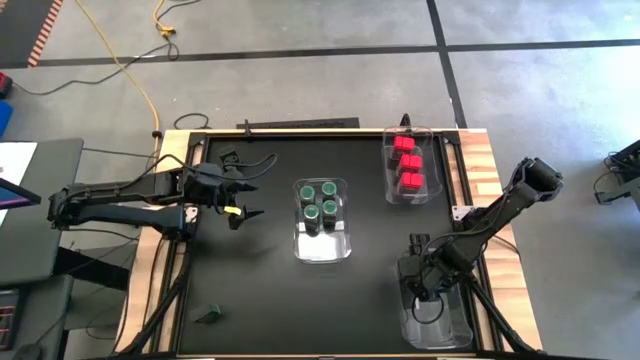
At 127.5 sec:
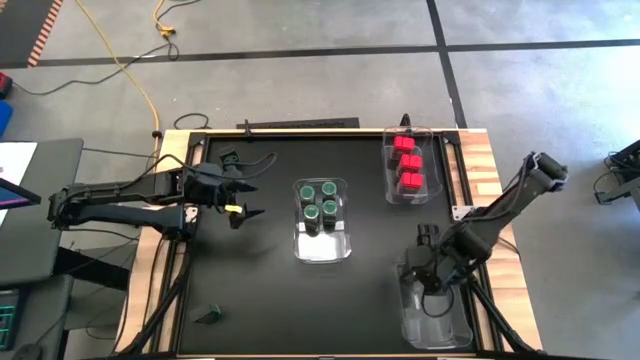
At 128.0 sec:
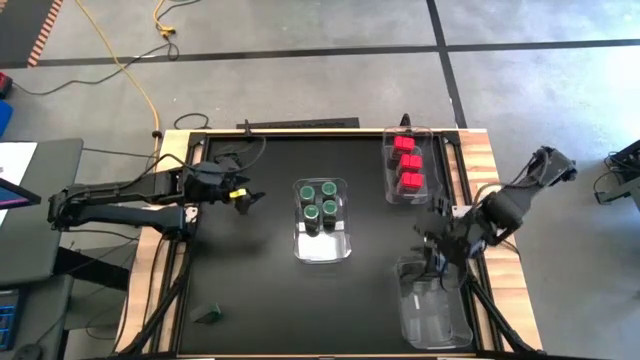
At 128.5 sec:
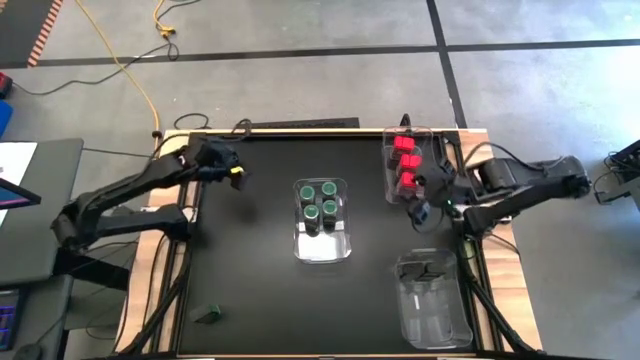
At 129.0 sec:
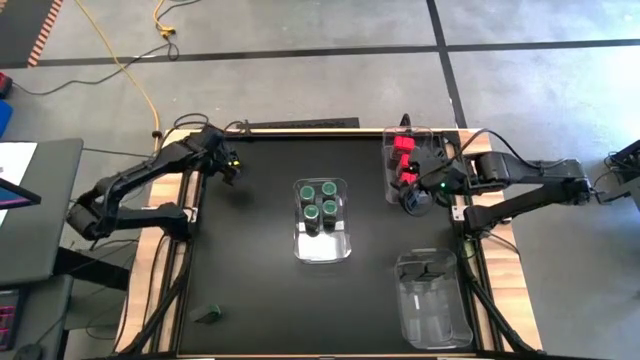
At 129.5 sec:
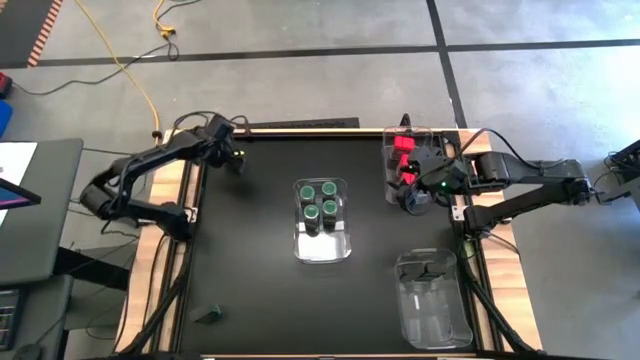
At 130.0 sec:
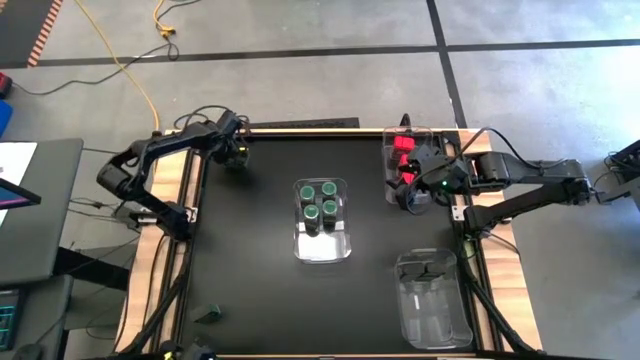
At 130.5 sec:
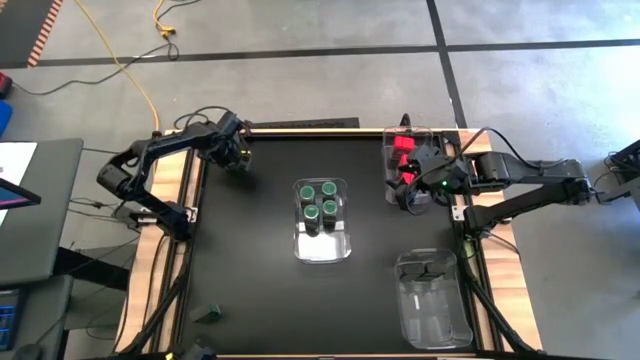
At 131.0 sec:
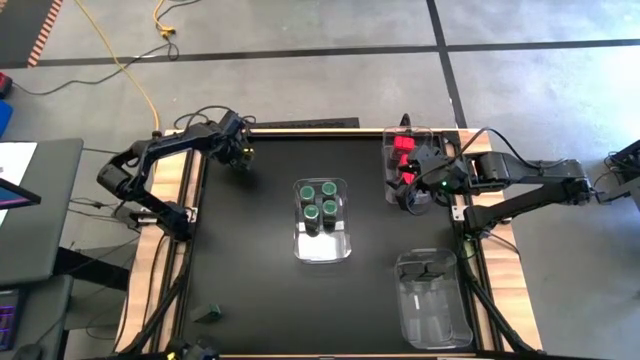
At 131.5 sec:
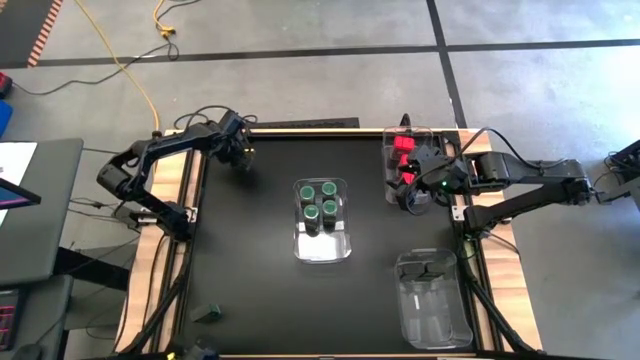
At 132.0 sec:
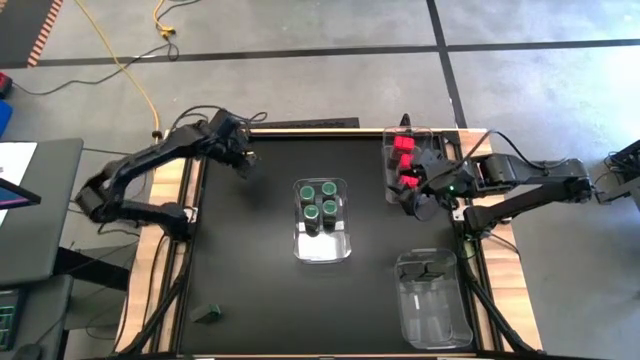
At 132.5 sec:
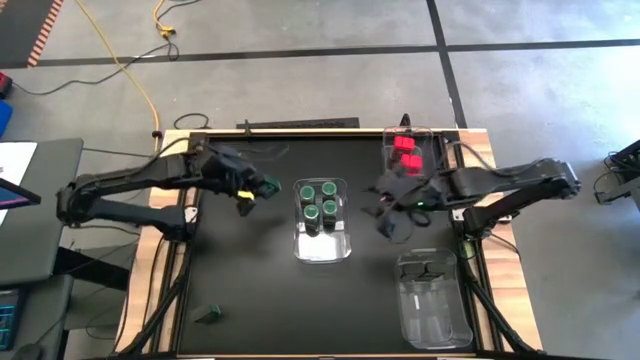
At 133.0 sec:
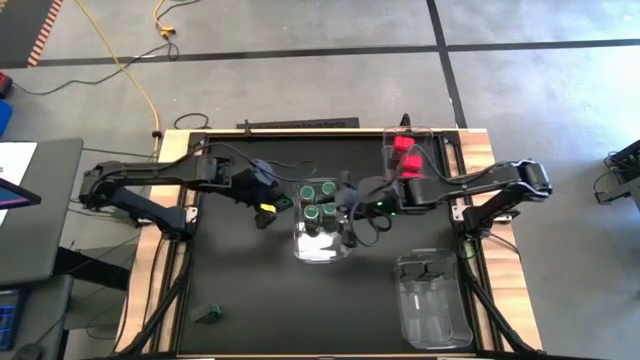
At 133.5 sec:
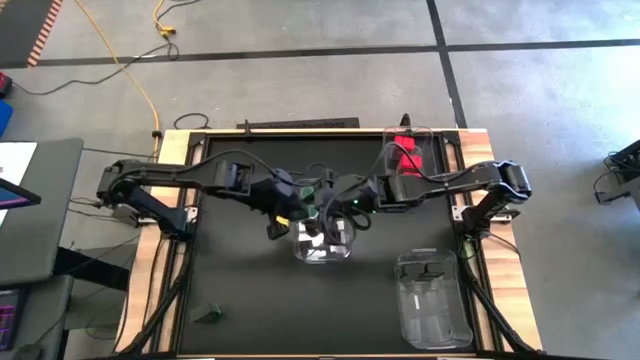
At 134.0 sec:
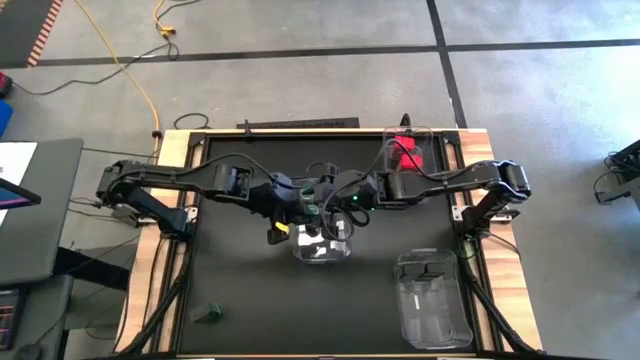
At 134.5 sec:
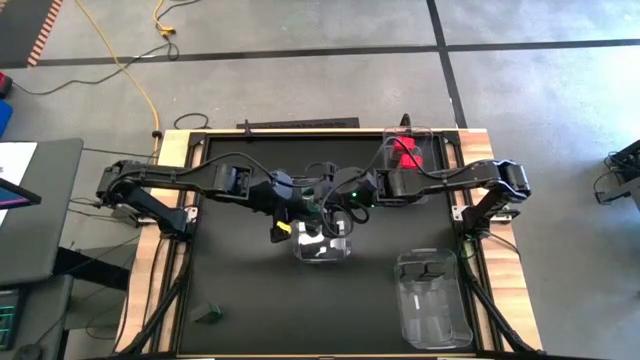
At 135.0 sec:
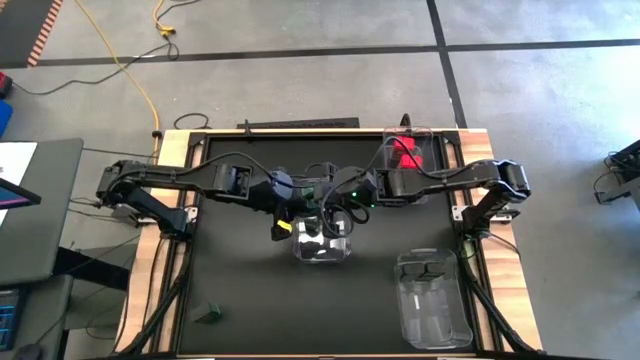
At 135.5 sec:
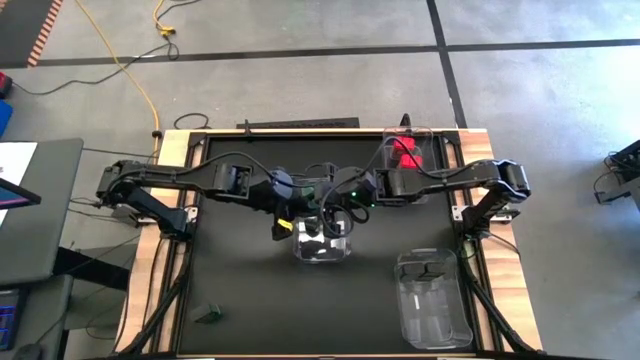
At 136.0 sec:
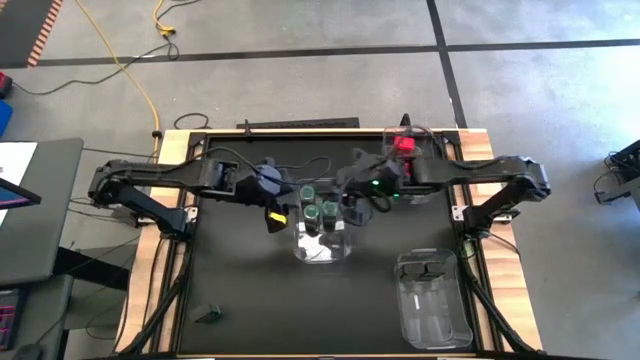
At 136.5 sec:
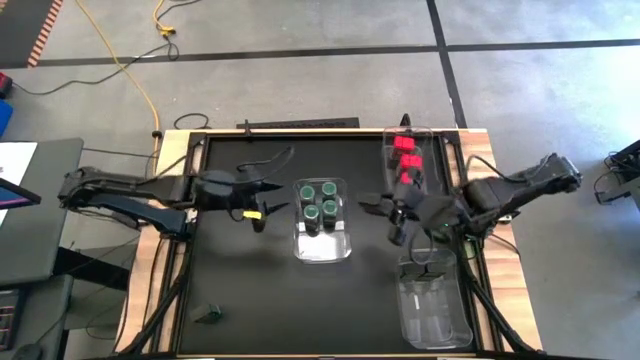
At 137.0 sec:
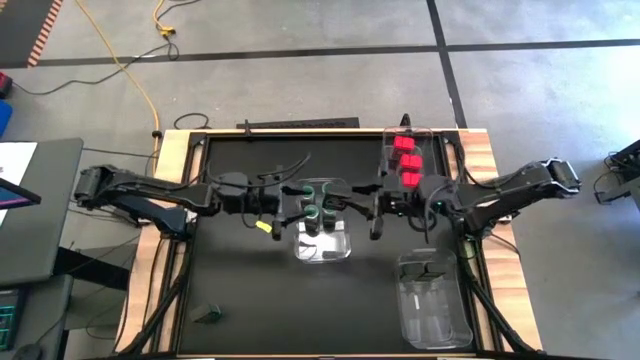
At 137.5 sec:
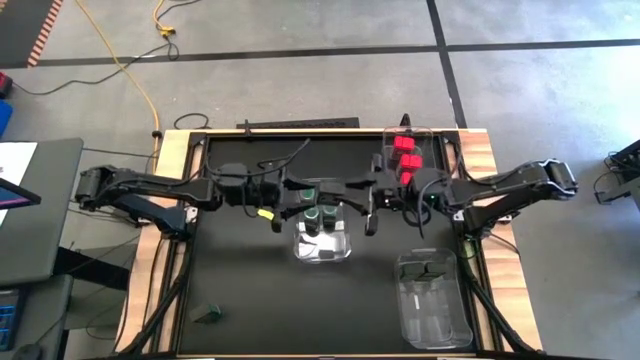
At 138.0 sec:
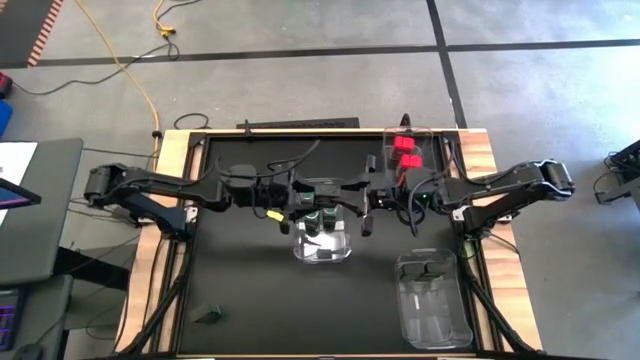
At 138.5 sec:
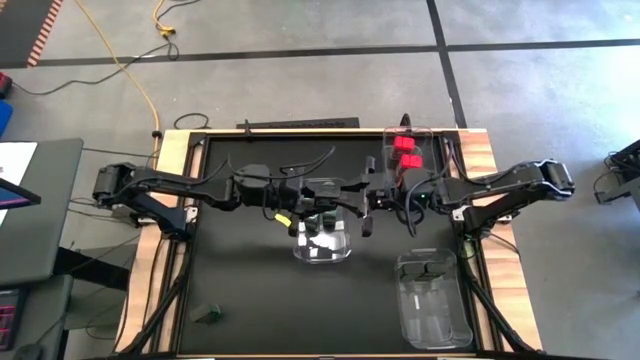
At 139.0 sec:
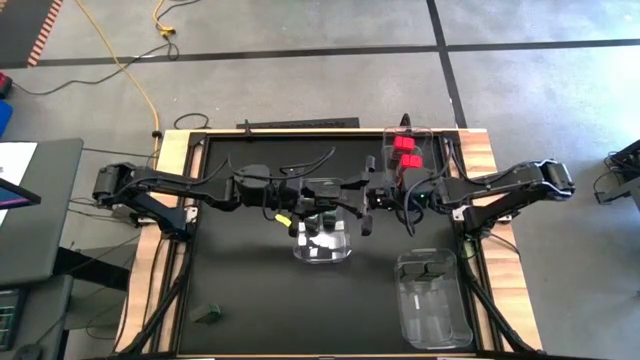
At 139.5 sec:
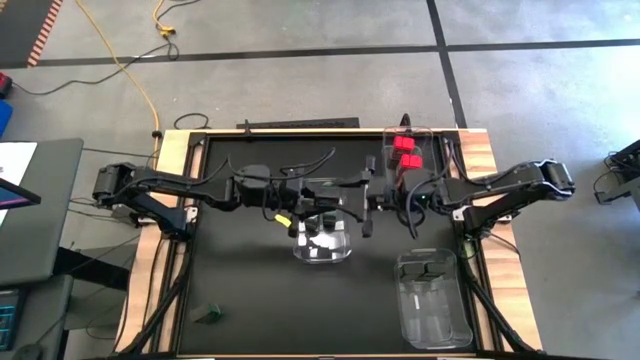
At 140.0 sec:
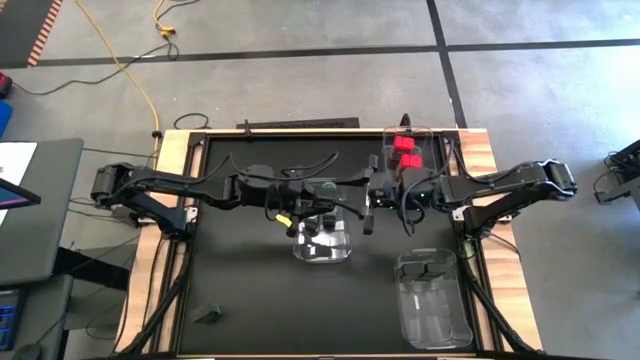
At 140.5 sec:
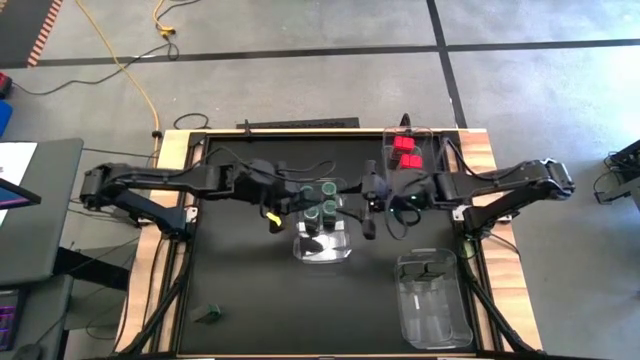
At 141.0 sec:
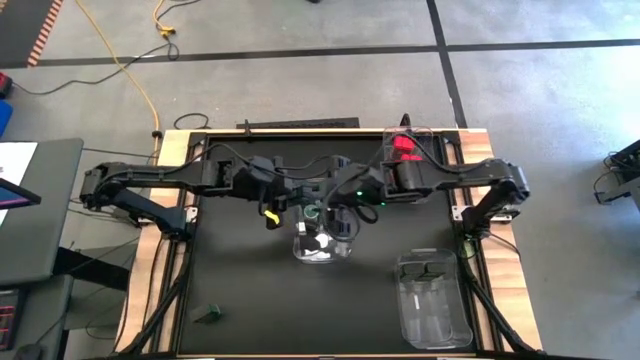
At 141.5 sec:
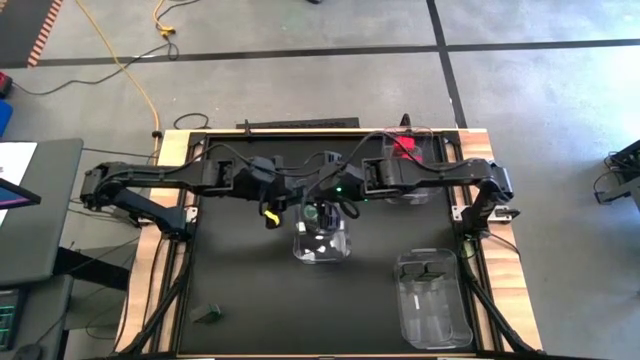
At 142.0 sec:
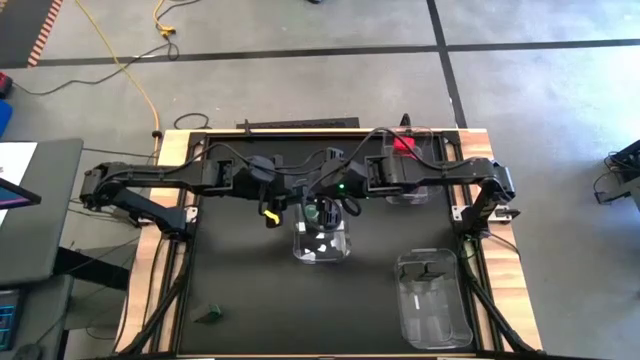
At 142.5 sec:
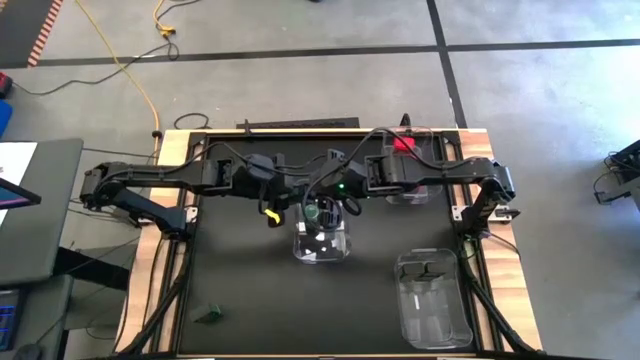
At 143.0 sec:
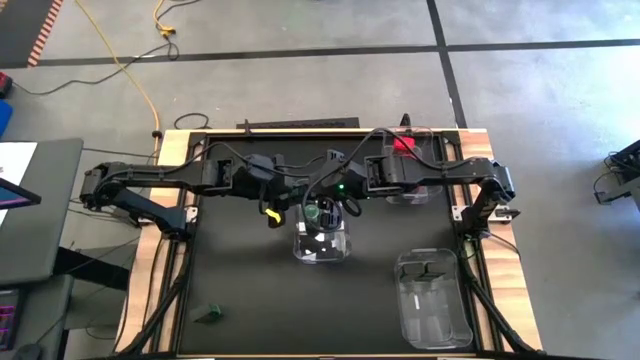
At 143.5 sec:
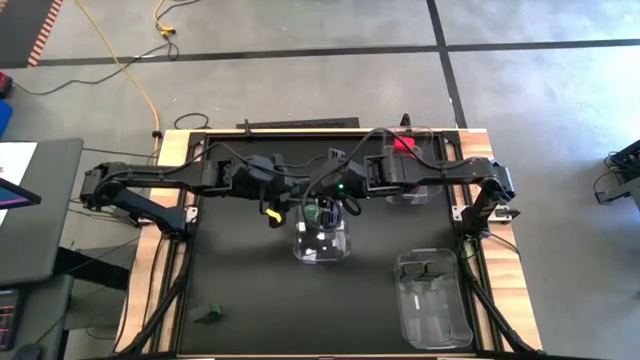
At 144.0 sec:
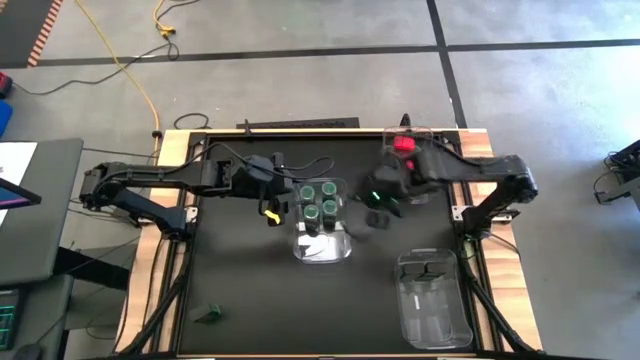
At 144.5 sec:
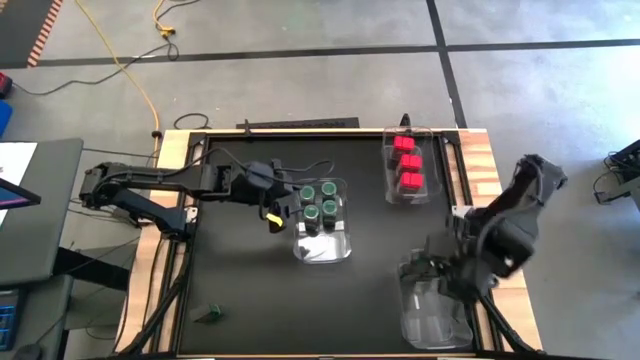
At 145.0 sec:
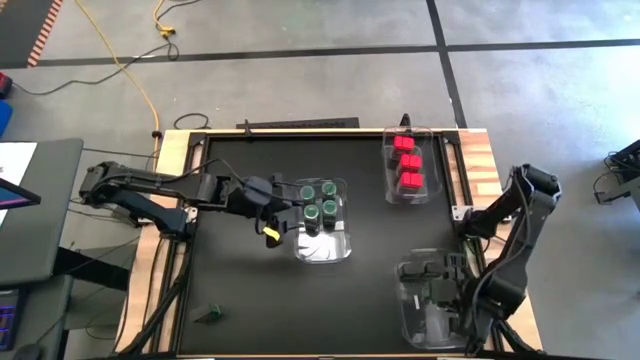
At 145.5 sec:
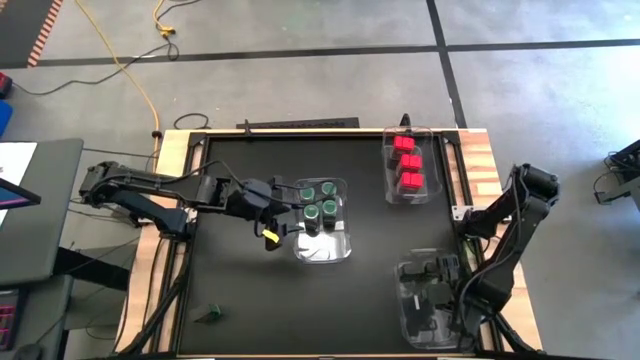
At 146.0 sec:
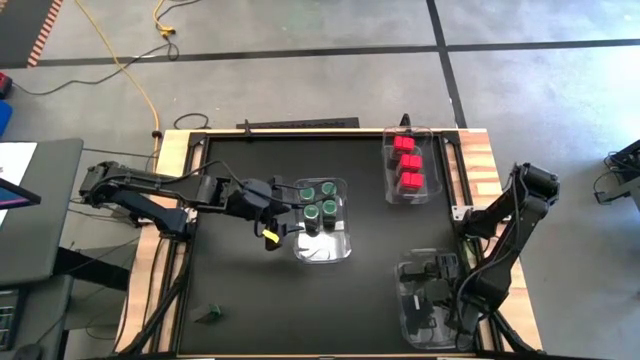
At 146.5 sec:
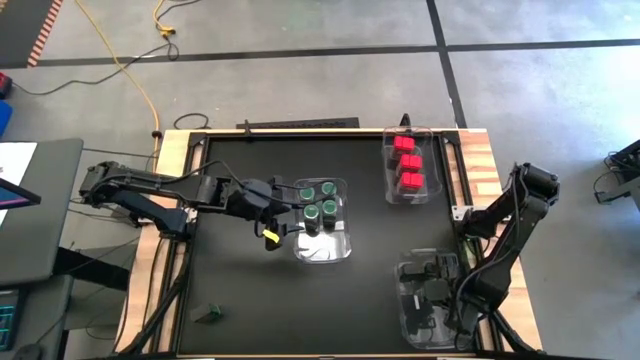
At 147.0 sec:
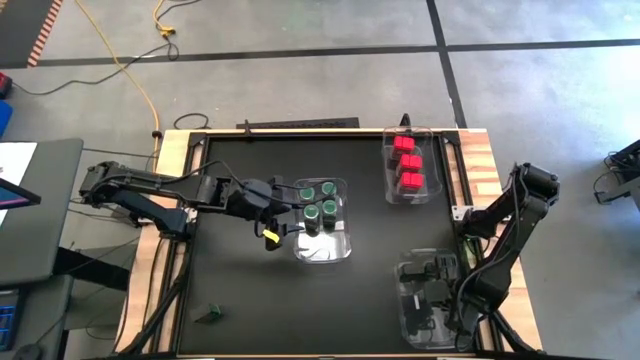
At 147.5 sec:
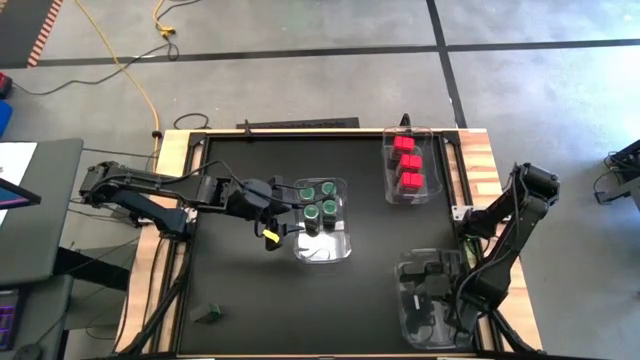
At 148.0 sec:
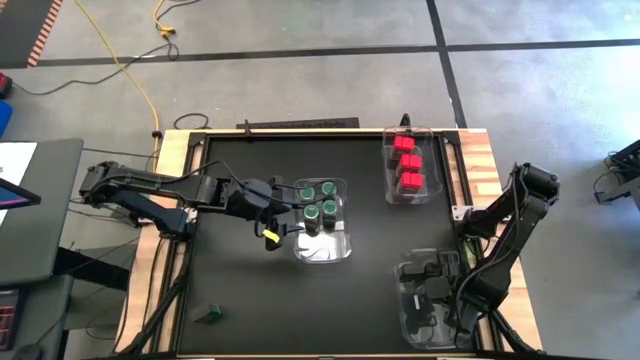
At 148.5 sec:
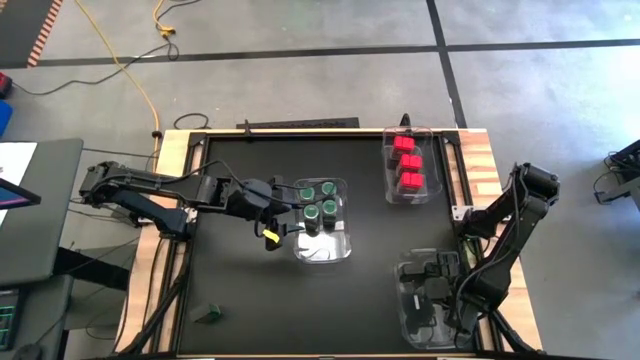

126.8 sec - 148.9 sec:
Task: Sort spices by type
Put the black seasoning can into the bottom transparent bin
